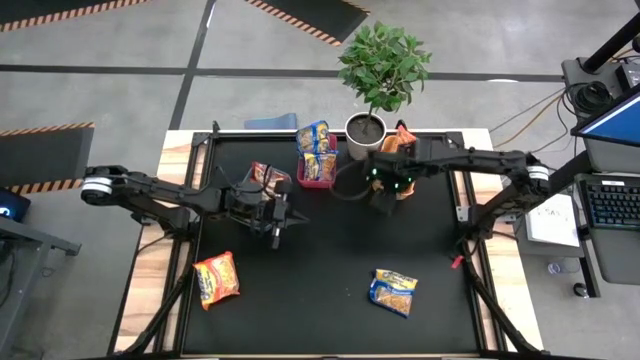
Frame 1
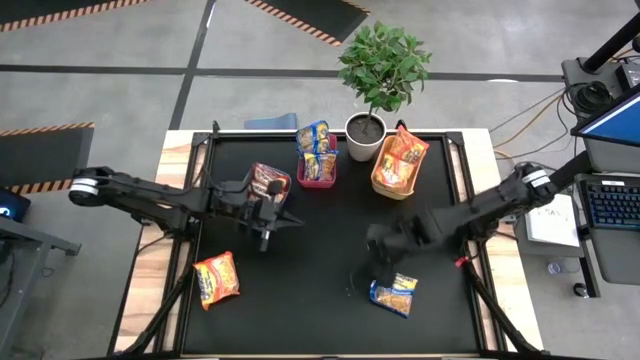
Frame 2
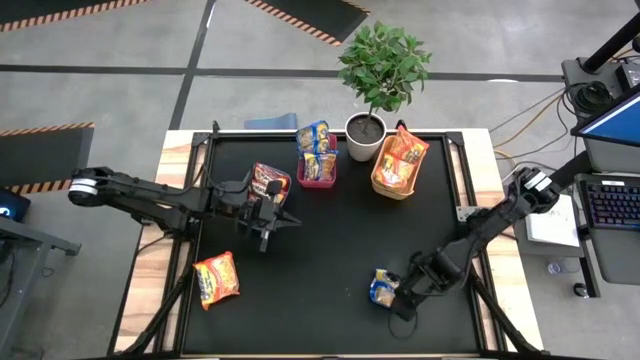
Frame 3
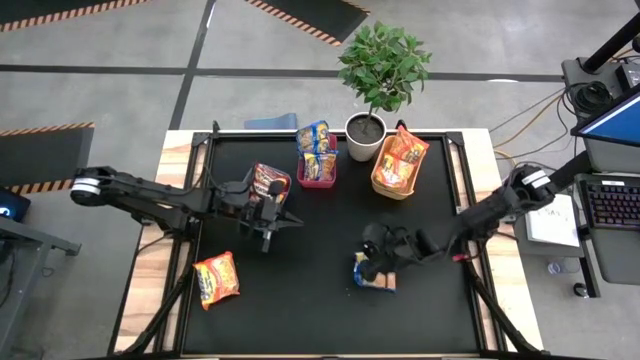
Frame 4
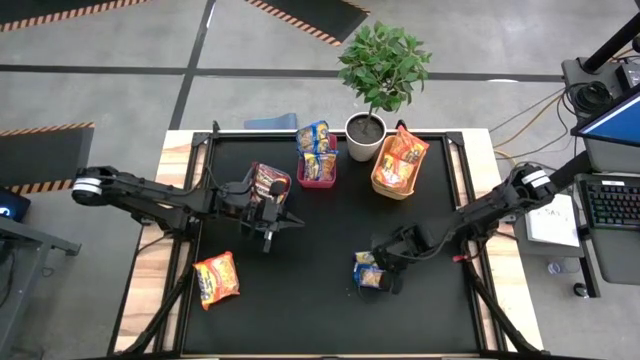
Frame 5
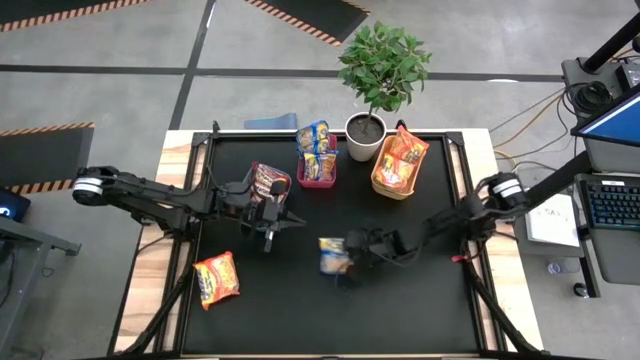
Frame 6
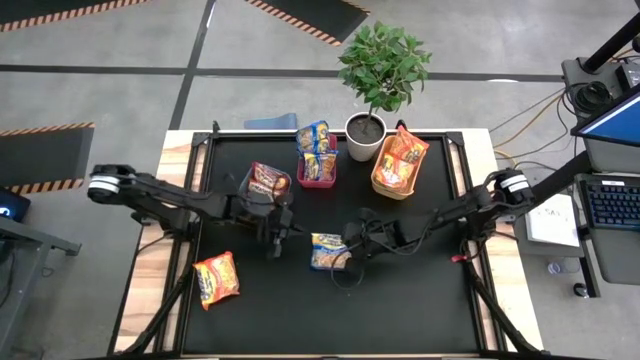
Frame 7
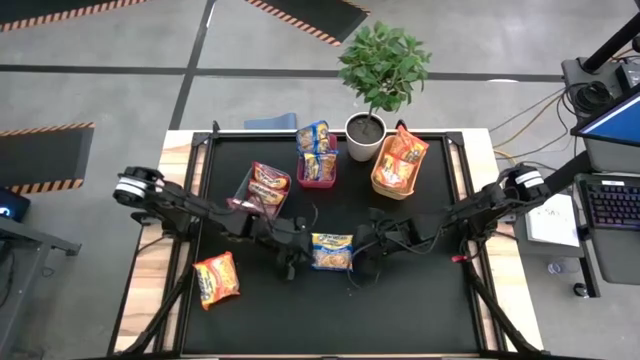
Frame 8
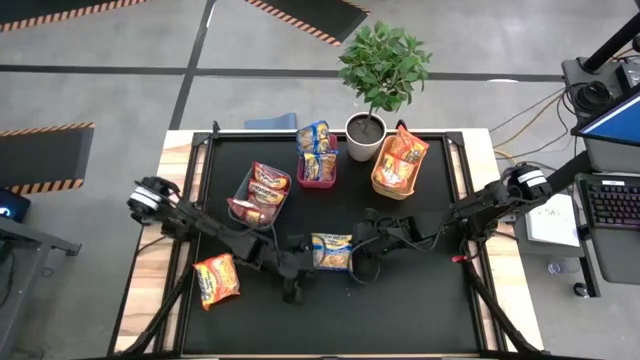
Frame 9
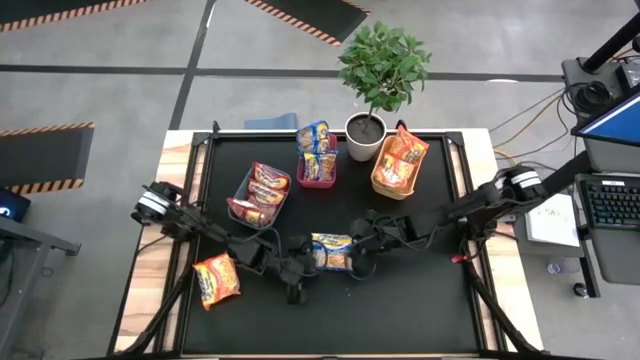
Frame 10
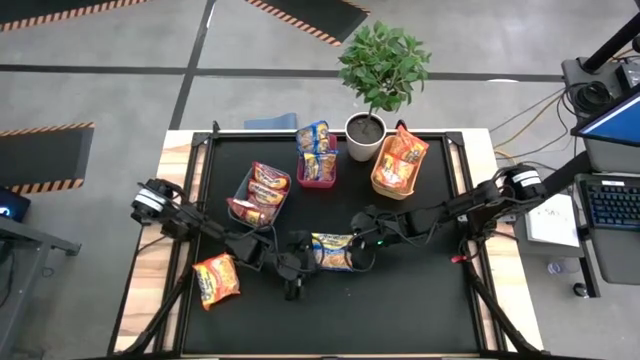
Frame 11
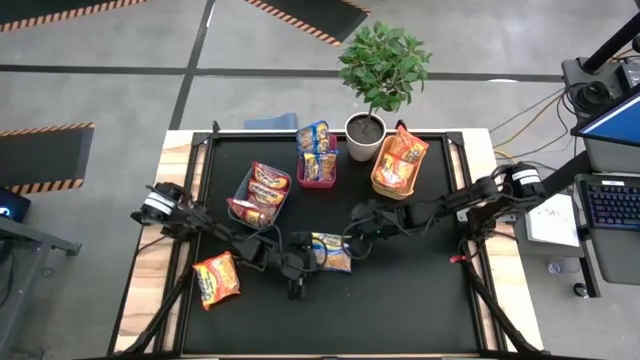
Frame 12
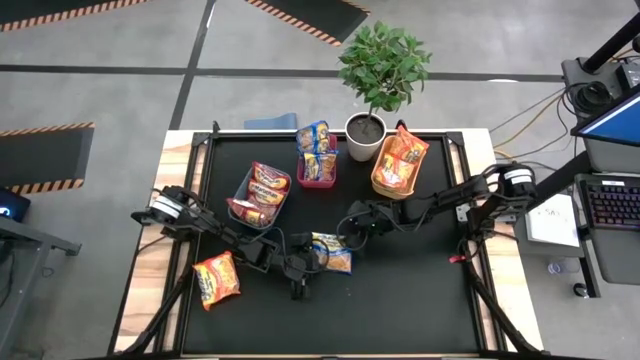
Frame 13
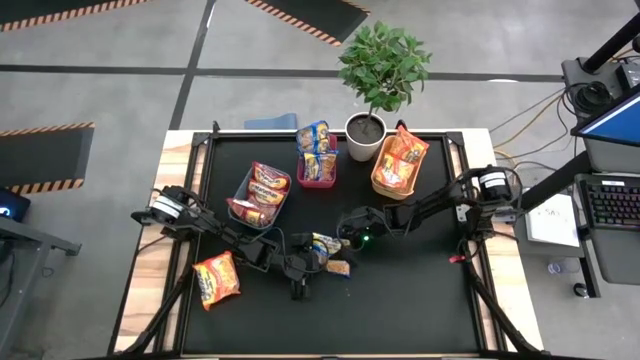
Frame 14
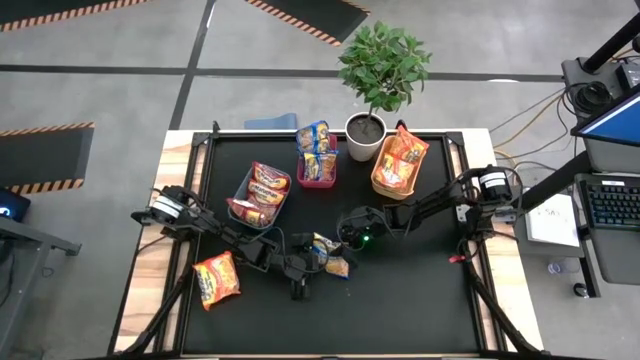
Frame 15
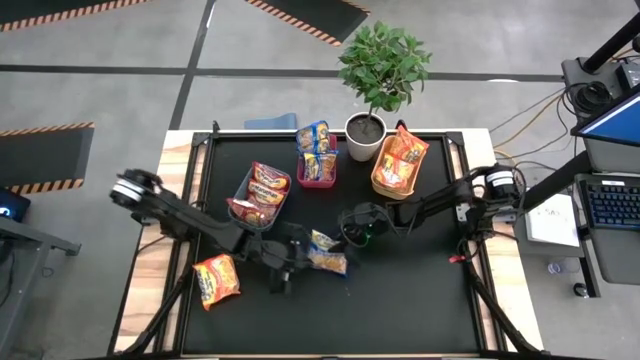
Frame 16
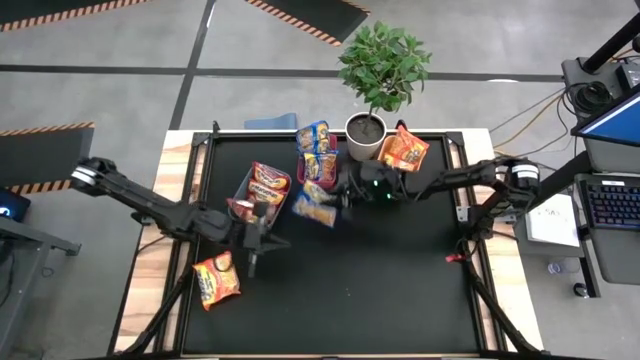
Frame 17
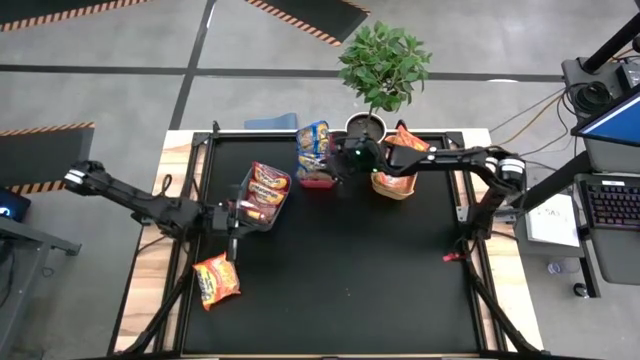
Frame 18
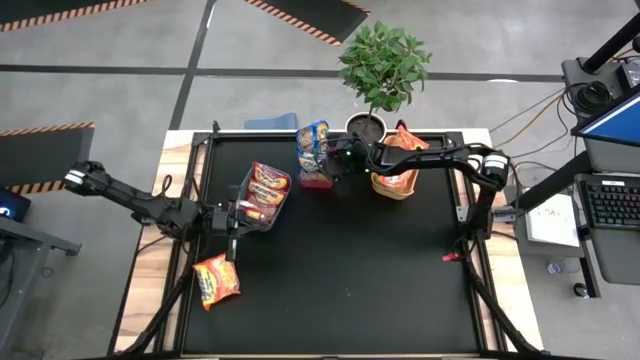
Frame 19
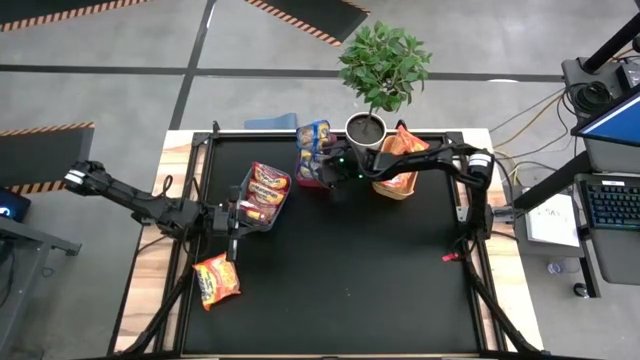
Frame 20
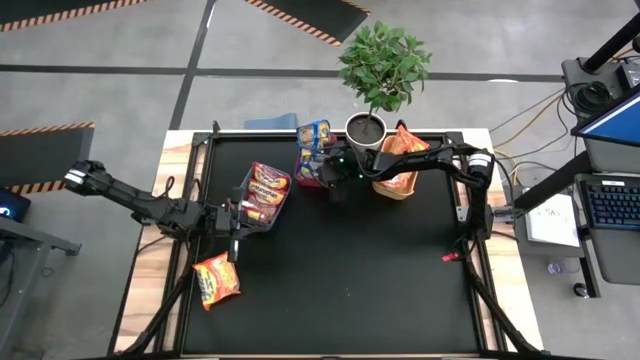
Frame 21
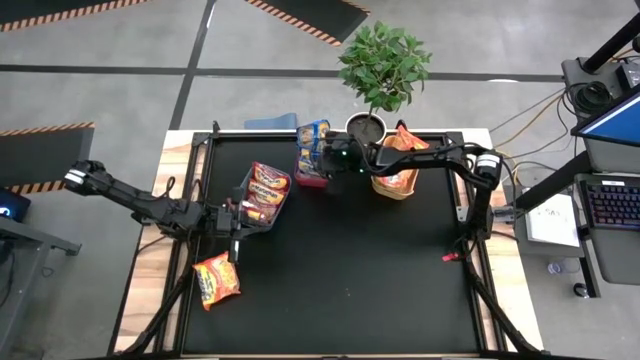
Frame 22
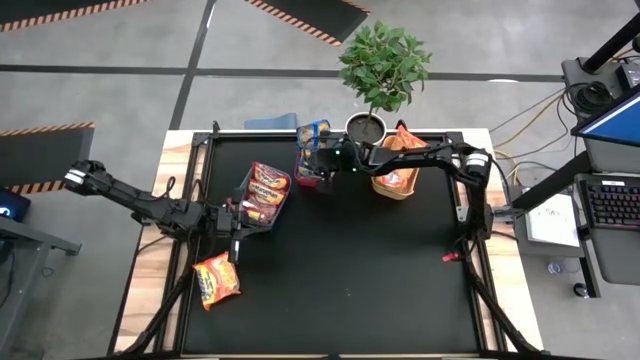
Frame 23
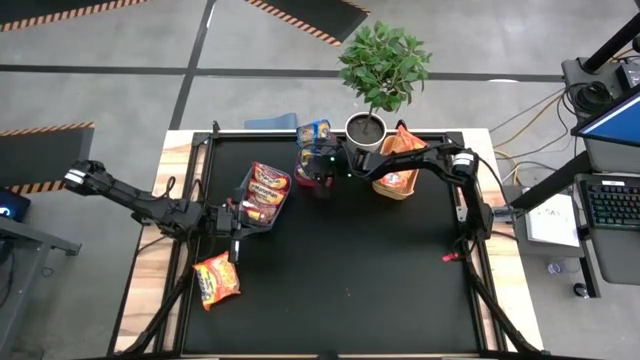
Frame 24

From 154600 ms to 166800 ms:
Task: Sort Maruchan noodles
Put the blue noodle pack into the red bin

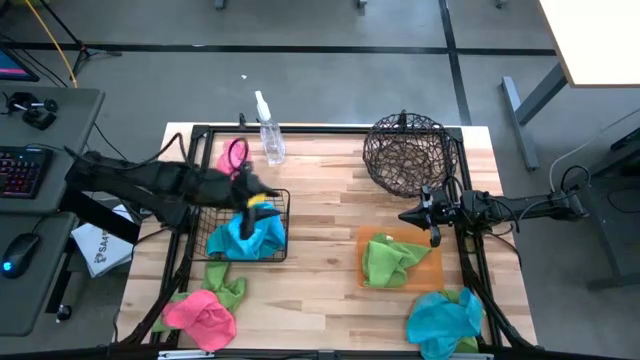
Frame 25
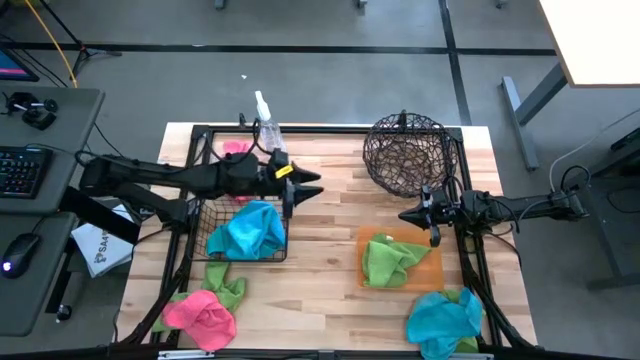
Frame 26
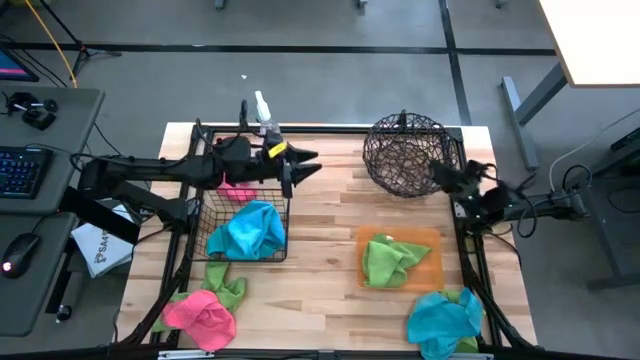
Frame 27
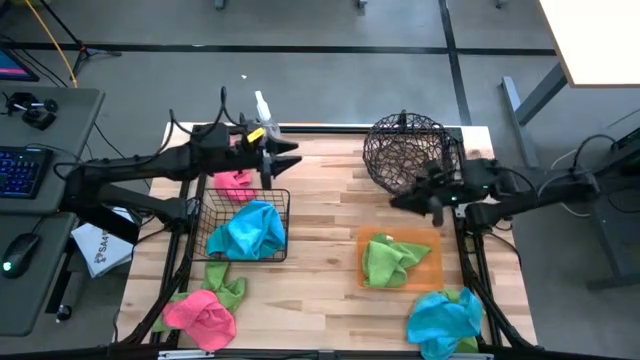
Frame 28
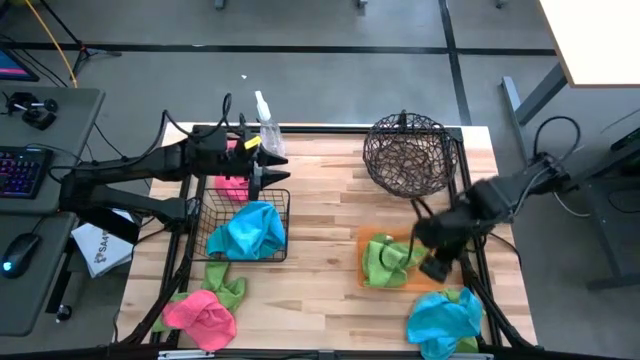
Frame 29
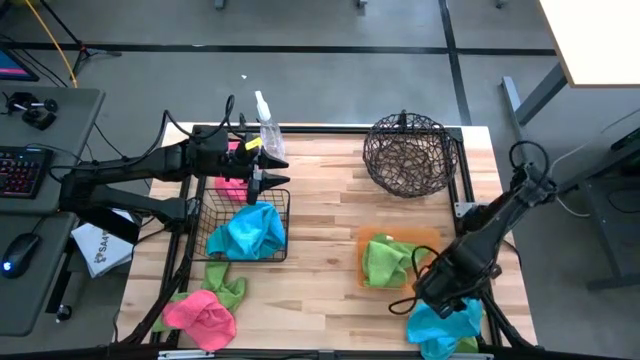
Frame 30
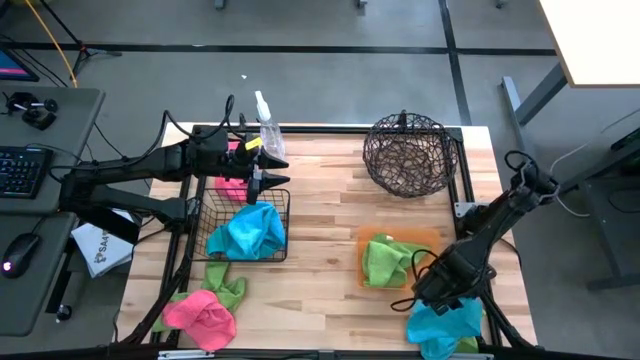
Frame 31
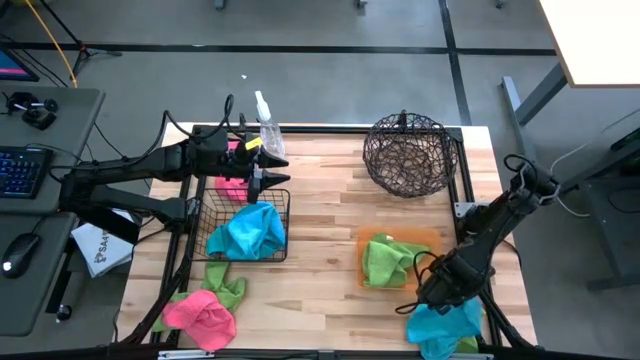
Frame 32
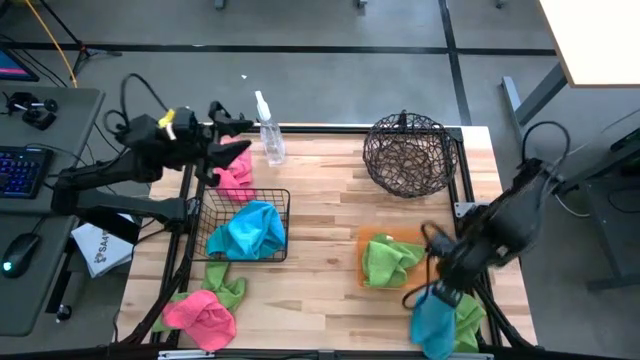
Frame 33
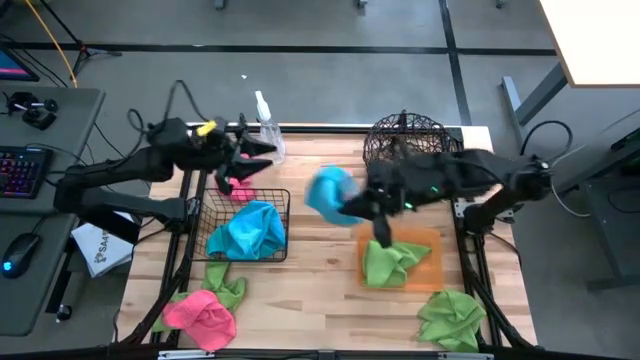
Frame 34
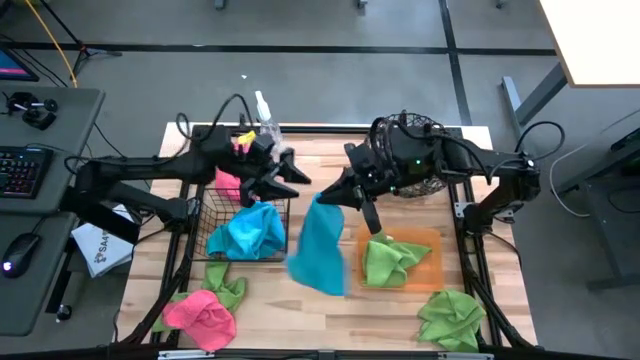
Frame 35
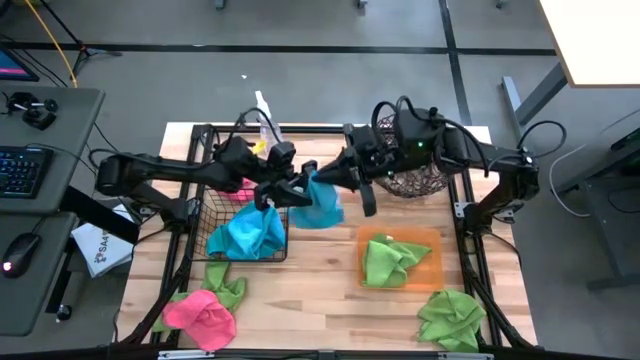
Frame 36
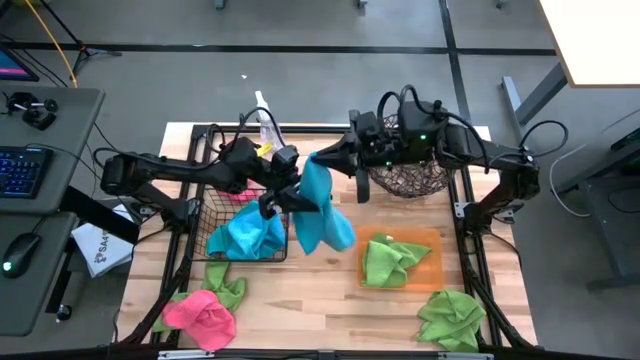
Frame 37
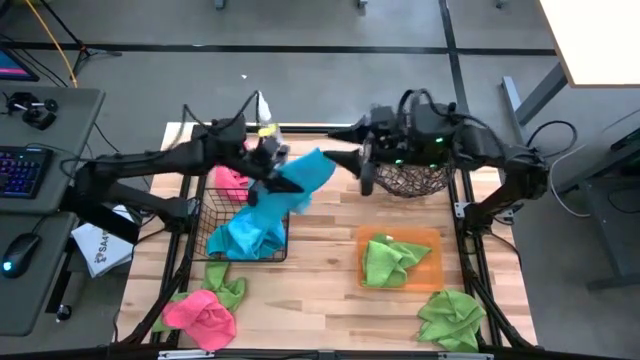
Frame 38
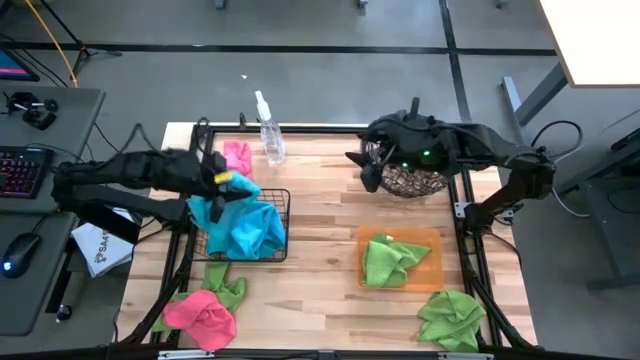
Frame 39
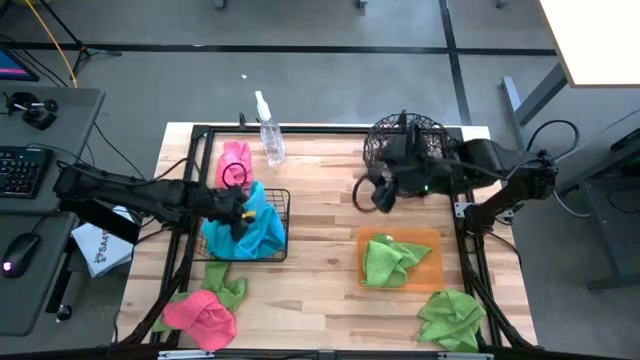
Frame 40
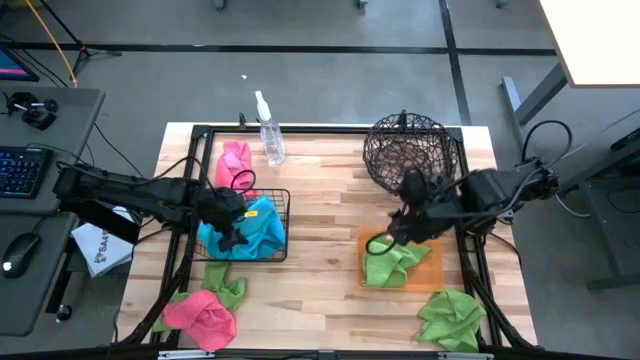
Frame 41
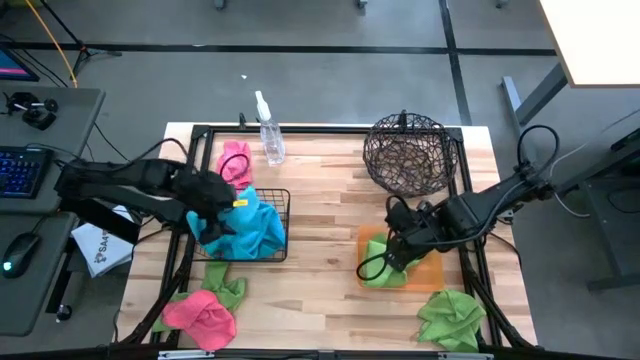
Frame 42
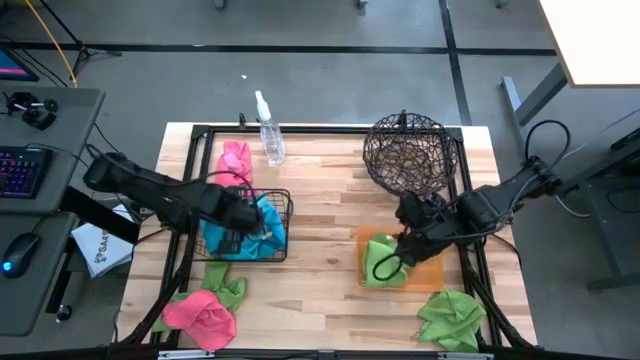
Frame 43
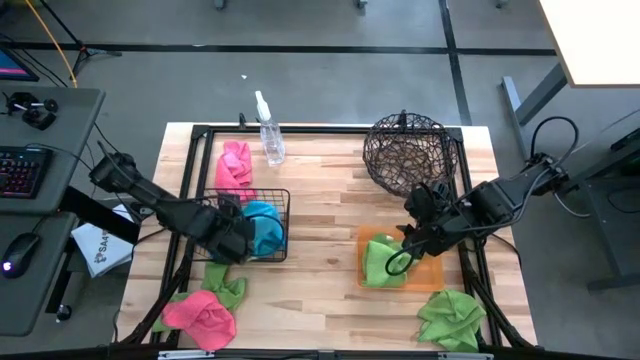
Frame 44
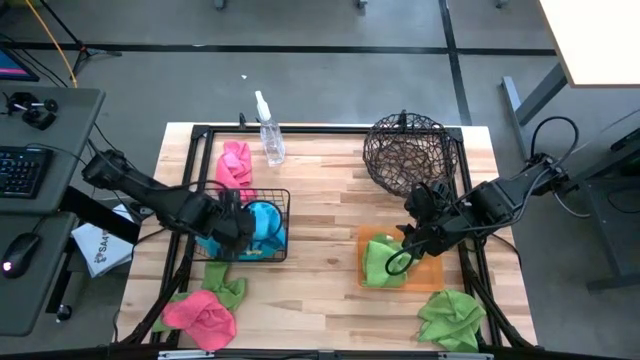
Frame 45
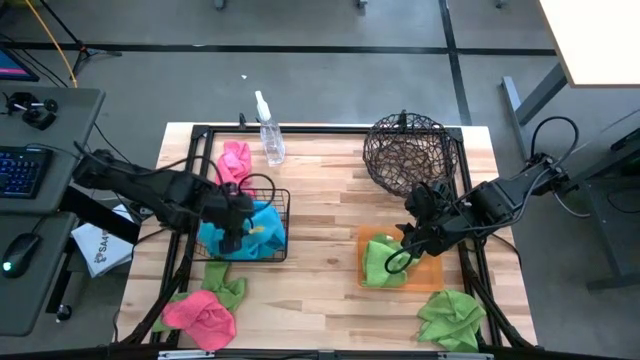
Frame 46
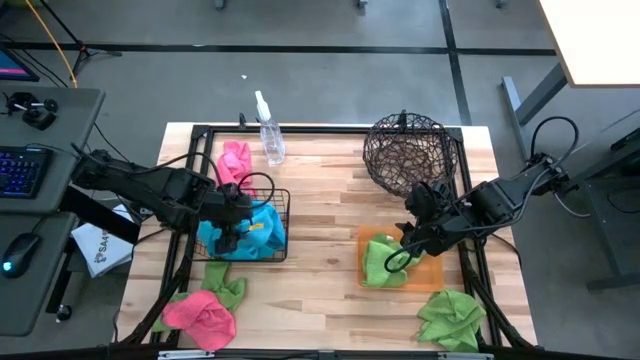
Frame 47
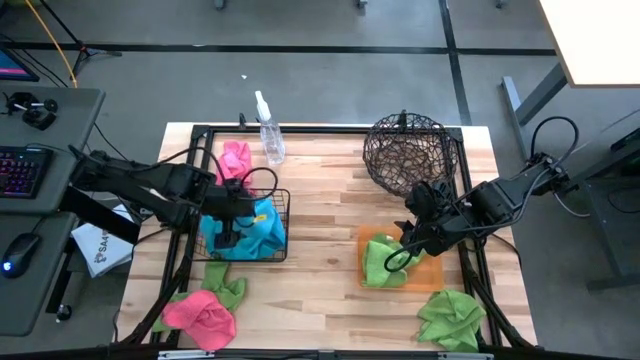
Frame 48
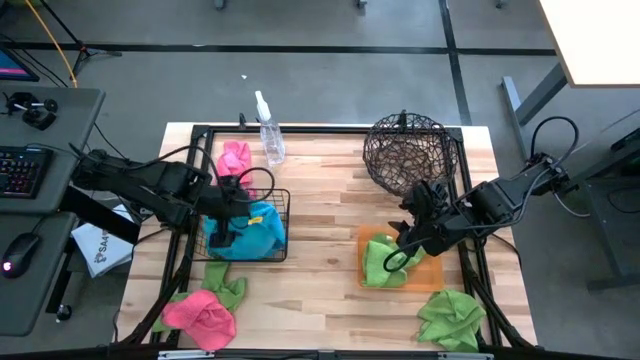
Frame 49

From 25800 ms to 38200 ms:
Task: Sort microfiber towel by color & place in baskets
Put the blue microfiber towel into the left wire basket
